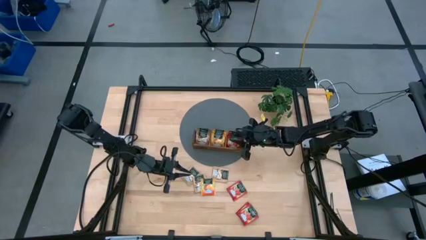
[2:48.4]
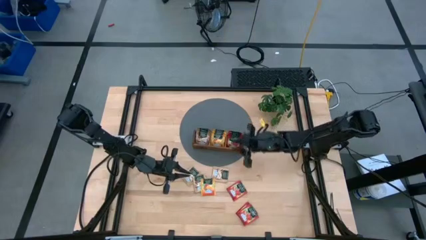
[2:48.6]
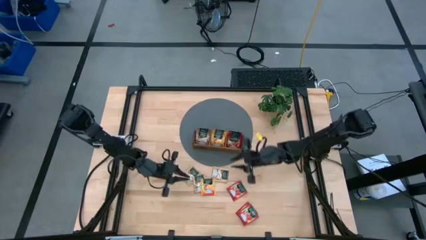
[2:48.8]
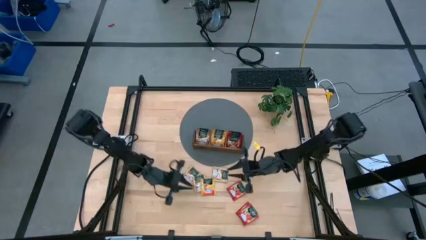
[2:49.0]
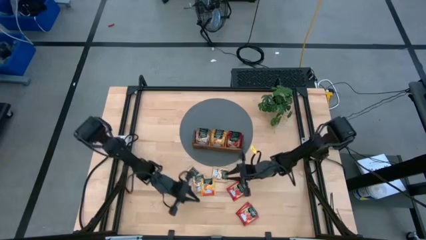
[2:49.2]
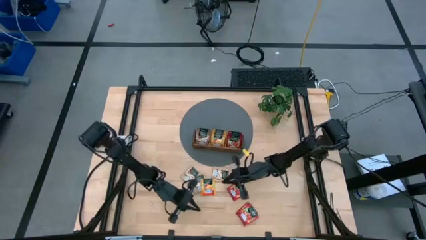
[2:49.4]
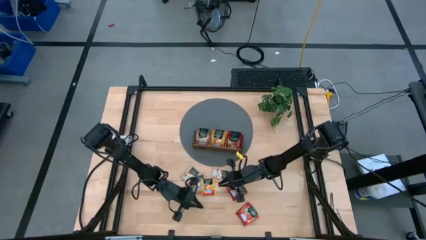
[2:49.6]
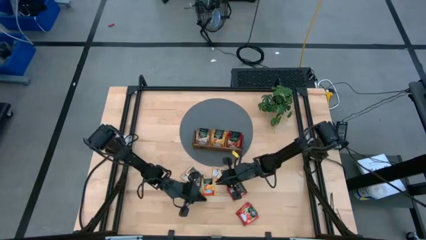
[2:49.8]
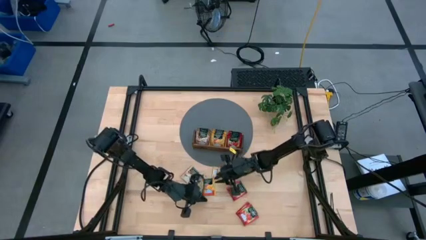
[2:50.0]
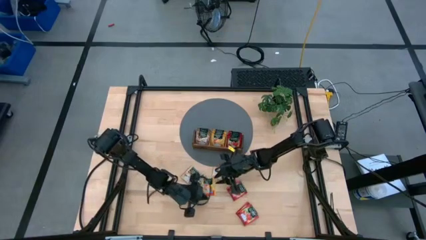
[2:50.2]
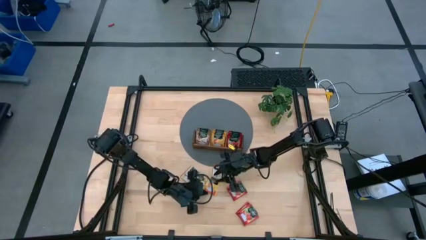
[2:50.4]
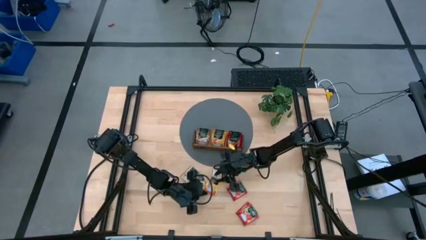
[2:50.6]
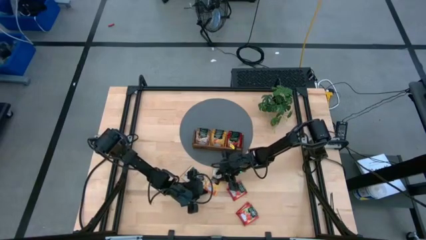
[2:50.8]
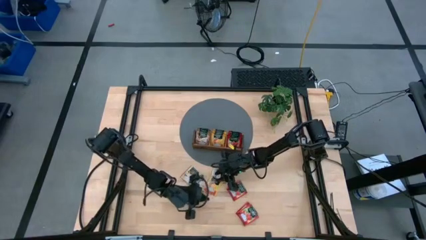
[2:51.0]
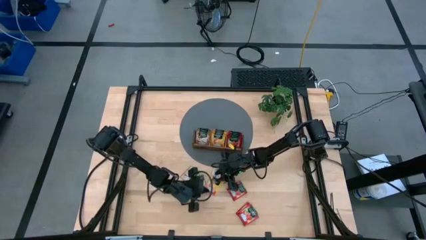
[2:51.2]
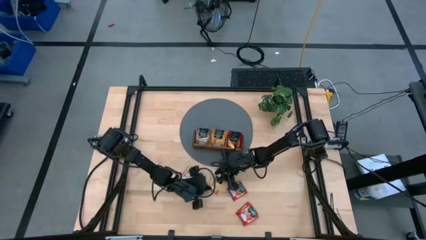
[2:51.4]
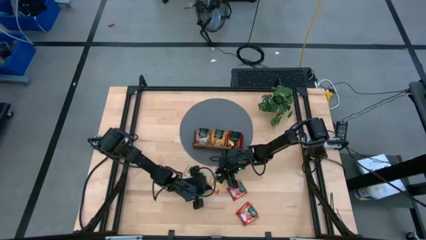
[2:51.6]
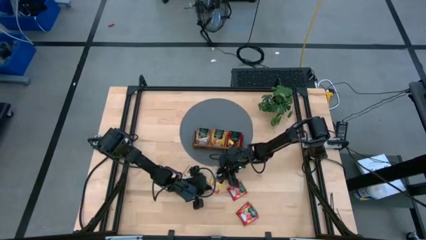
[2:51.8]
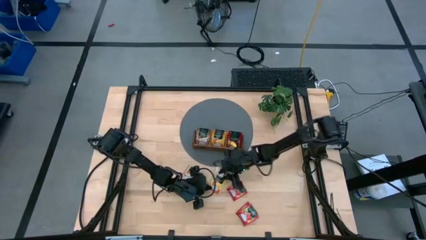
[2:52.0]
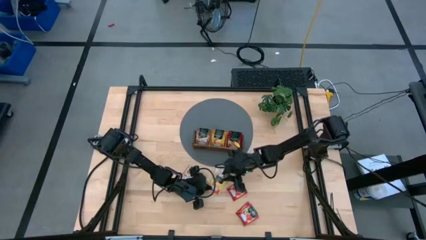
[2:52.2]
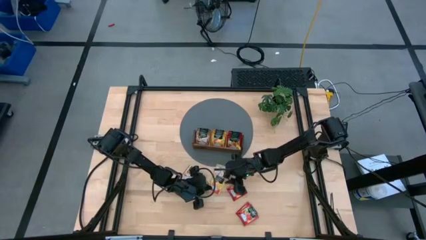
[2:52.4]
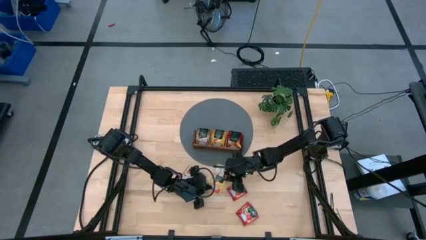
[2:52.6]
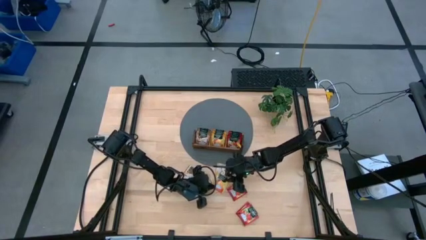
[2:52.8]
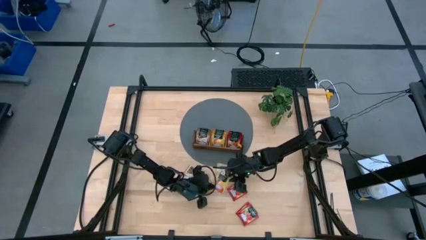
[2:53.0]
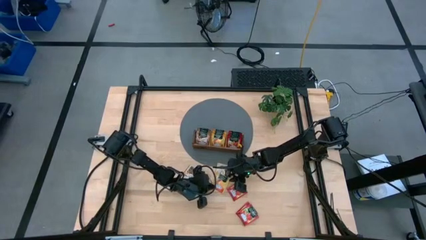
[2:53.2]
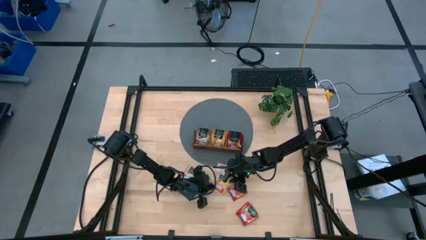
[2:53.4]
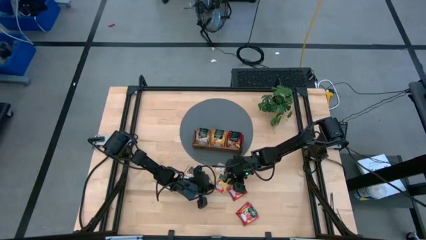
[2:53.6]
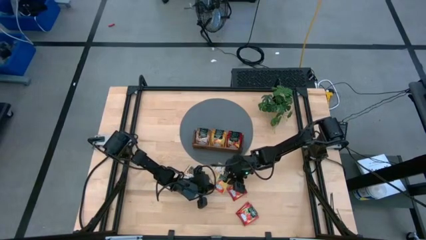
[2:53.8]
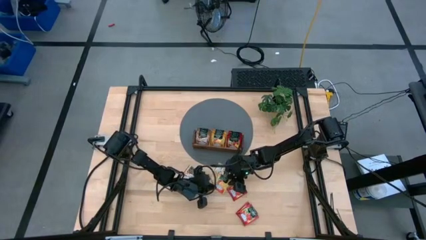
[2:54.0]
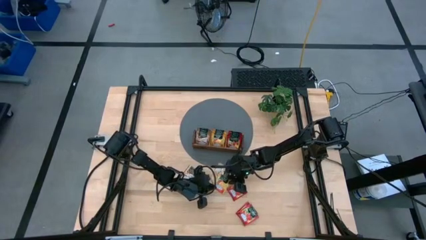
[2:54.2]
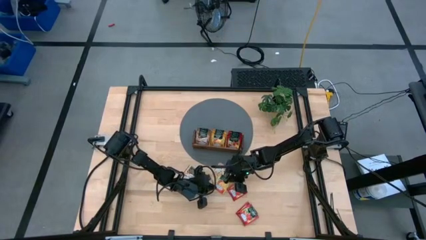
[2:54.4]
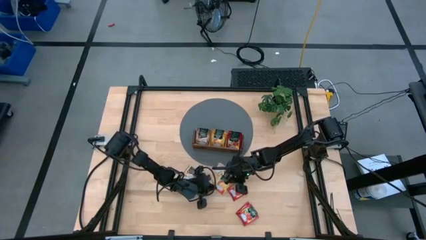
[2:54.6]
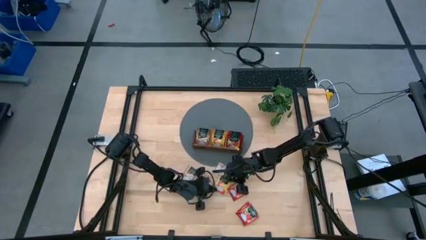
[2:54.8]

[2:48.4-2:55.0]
Task: Pick & Place Tea
Put the yellow tea bag into the middle section of the wooden organizer

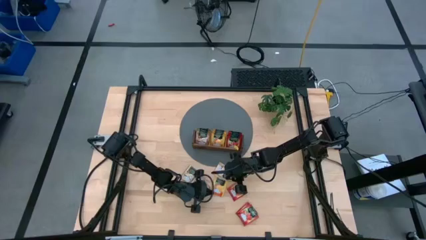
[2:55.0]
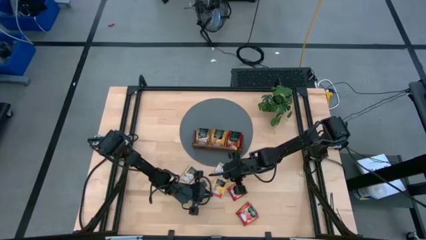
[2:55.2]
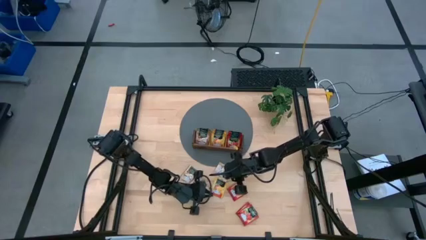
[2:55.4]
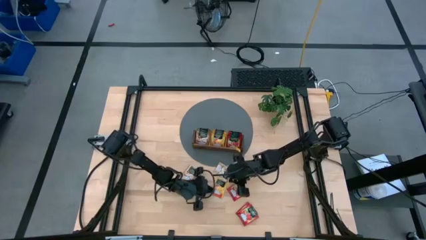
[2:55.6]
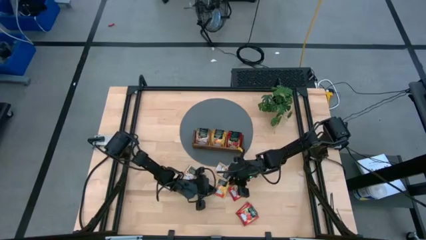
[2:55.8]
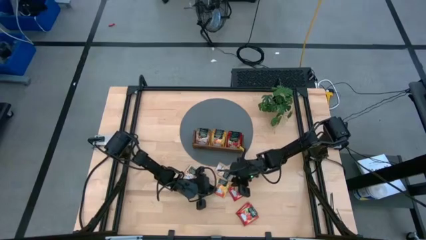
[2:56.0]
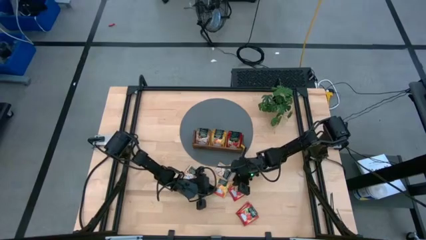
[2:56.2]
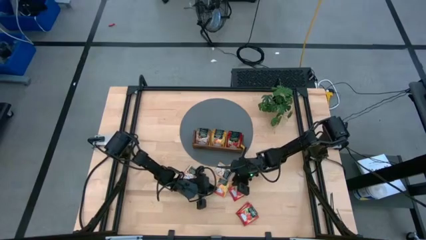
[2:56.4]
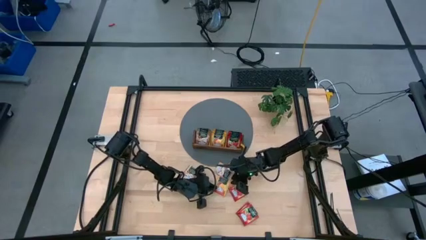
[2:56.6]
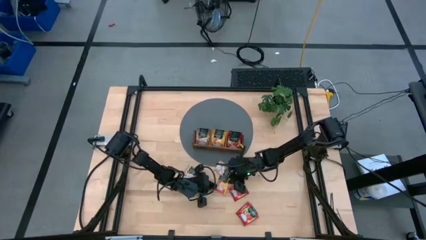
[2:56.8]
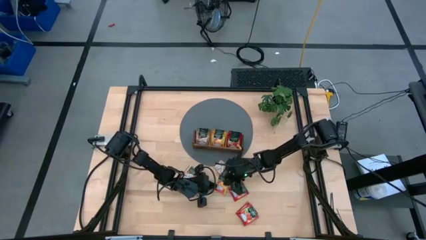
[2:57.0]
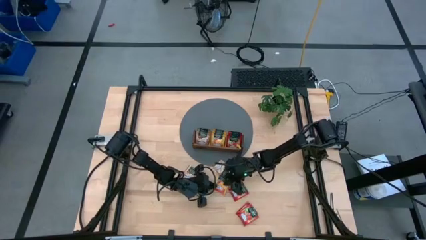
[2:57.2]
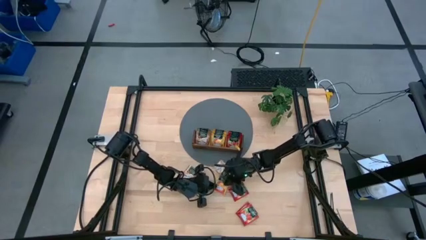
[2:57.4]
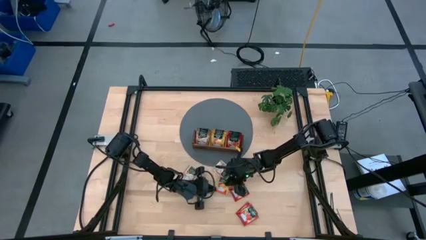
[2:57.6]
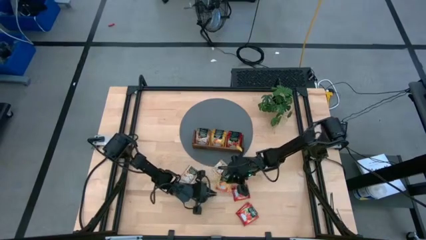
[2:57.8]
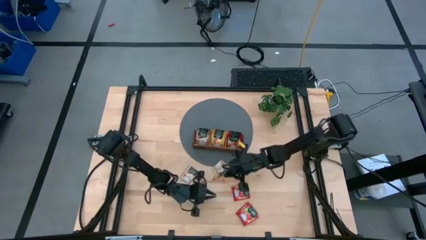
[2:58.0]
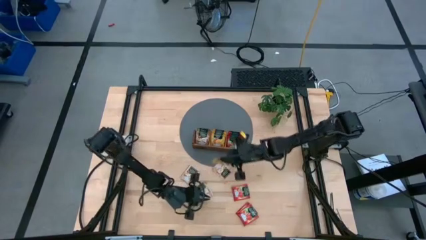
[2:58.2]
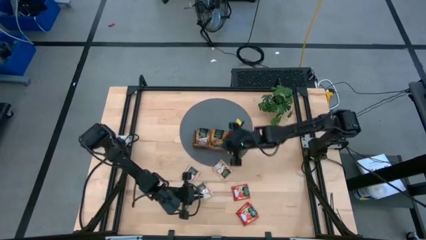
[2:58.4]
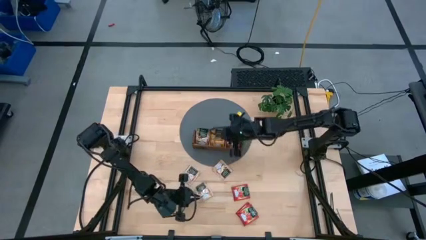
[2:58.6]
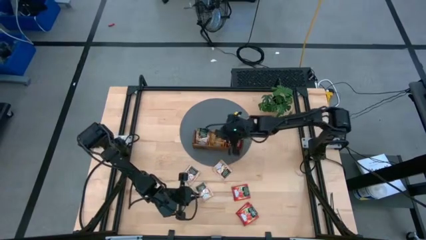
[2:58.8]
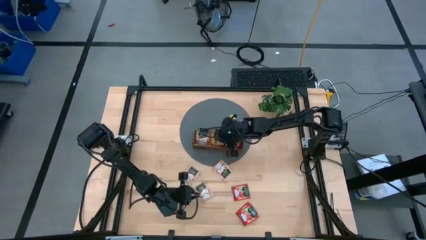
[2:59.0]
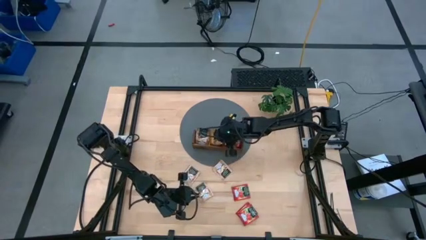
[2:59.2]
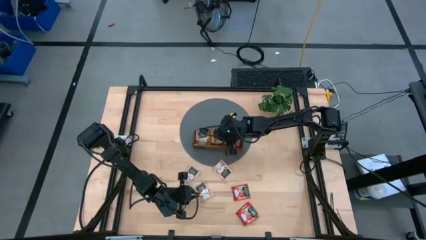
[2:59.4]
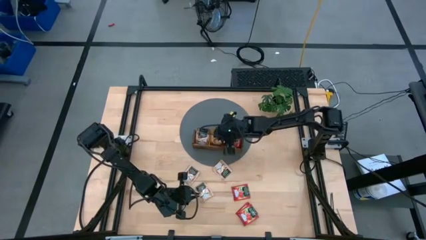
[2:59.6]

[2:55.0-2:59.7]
Put the yellow tea bag into the middle section of the wooden organizer

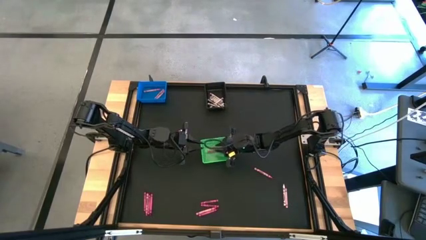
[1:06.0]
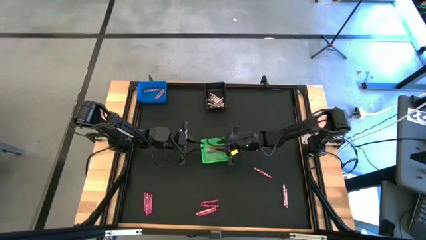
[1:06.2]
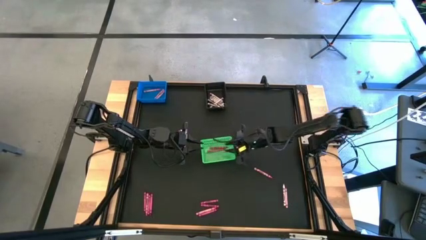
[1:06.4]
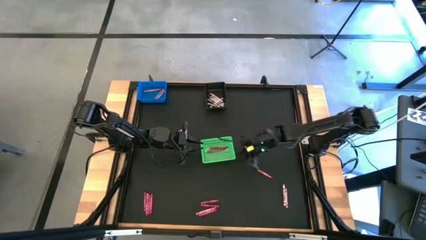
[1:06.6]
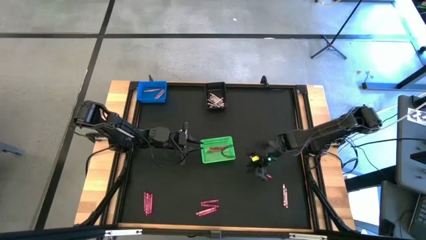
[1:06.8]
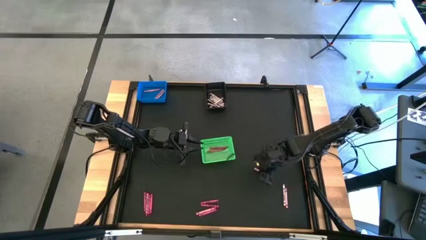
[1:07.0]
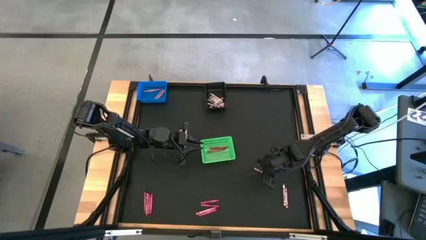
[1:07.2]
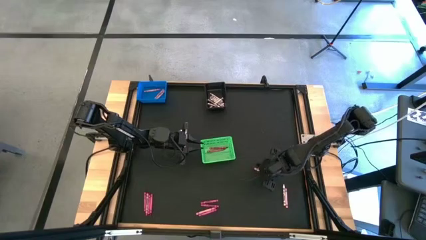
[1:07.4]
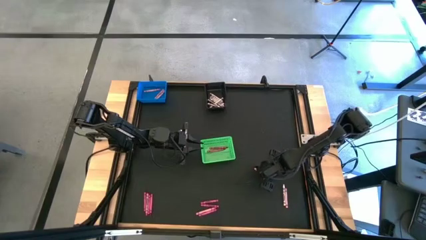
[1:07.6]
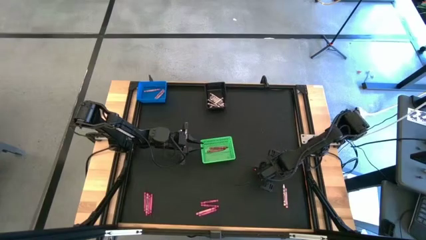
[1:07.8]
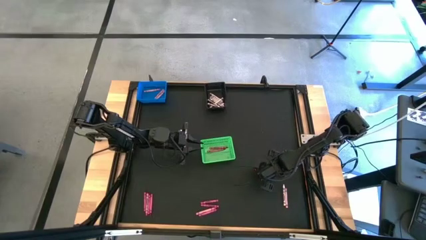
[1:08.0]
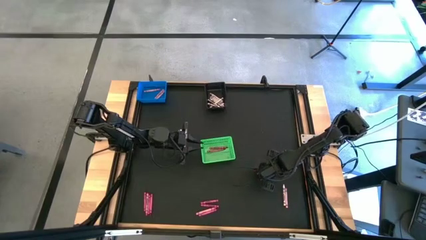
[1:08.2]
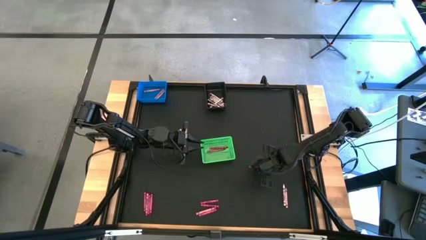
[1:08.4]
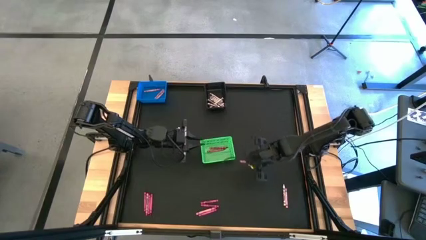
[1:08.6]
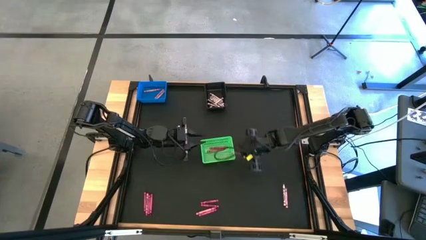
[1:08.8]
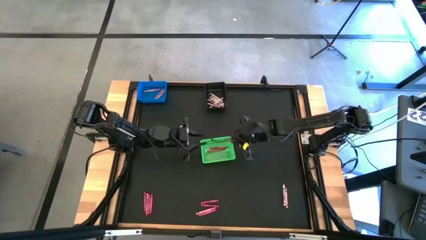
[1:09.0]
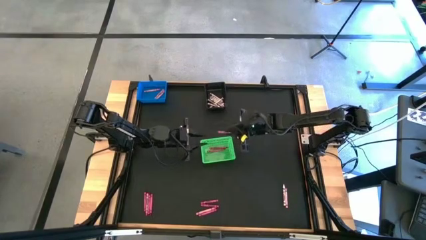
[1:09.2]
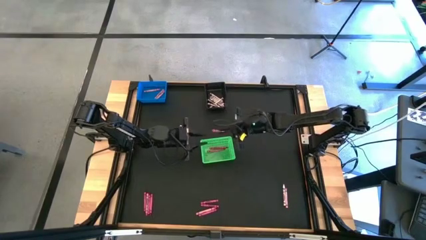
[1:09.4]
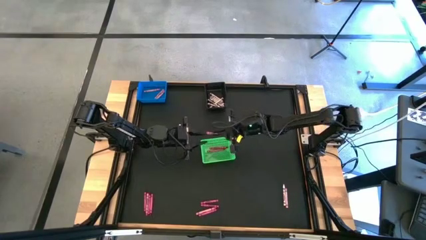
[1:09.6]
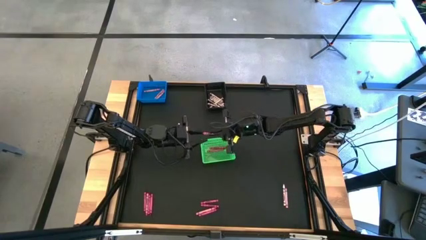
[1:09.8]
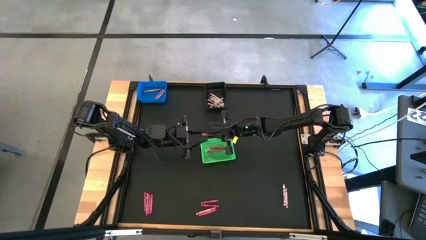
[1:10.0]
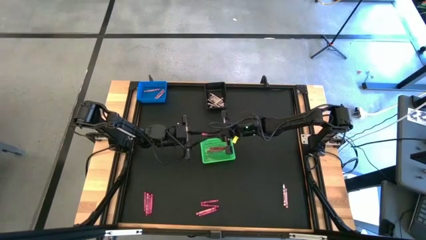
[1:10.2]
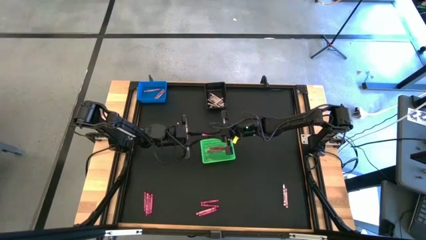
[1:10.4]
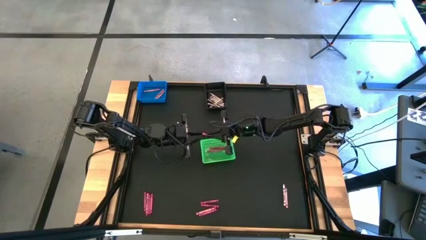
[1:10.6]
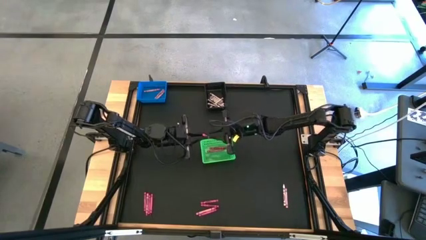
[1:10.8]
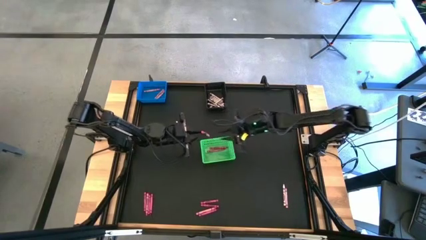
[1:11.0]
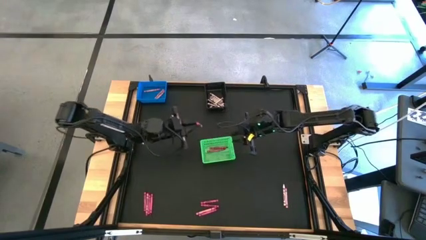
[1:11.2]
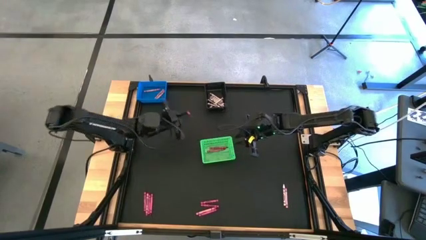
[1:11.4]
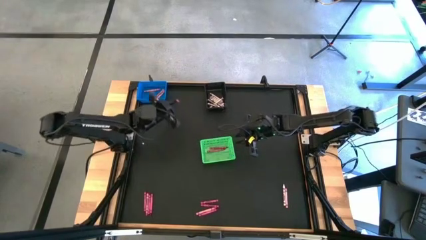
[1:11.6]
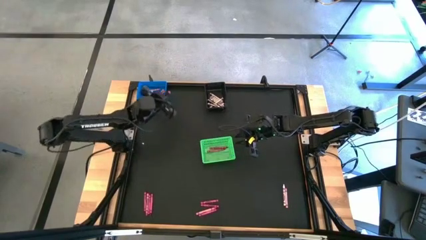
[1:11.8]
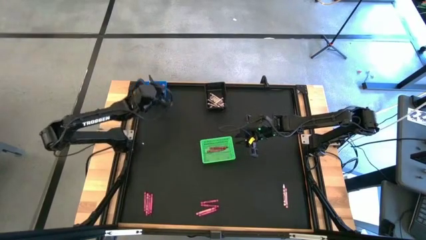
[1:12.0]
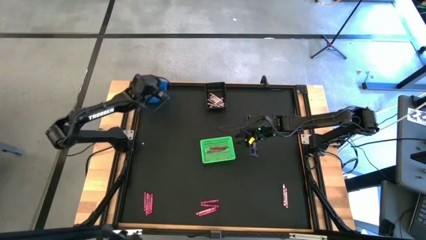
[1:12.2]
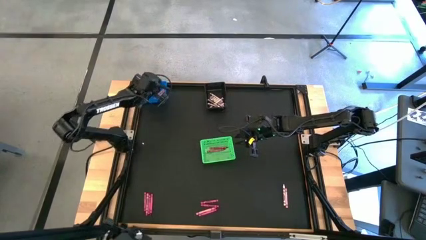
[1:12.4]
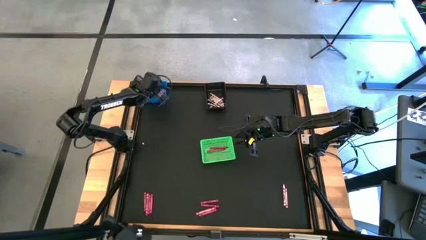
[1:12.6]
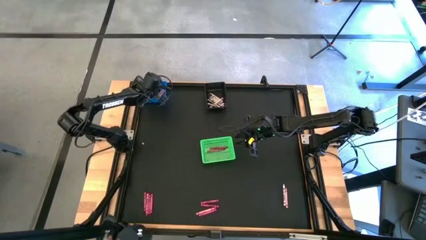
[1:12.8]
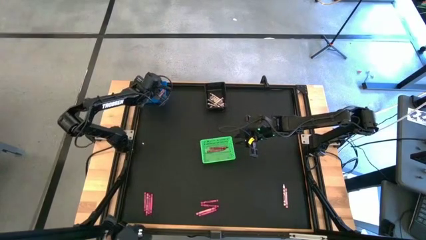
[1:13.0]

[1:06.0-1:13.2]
Task: Sort crayons
Put the pink crayon into the blue bin
